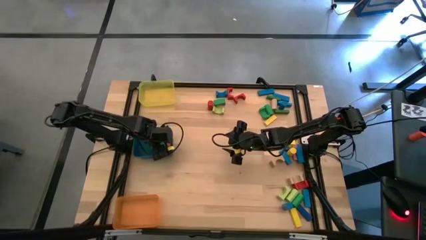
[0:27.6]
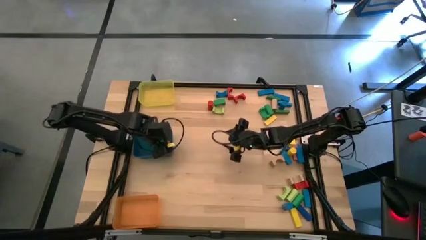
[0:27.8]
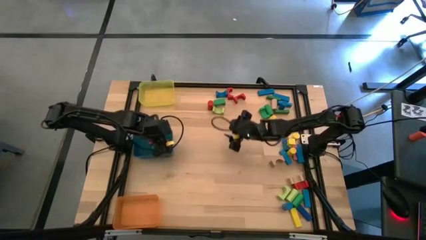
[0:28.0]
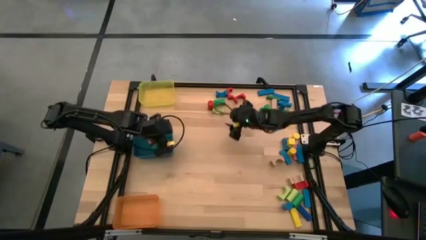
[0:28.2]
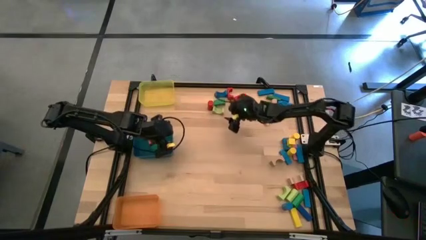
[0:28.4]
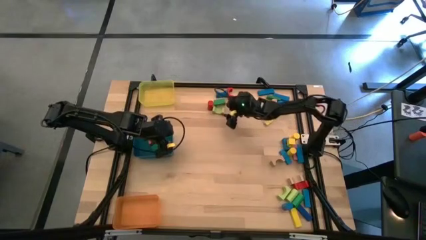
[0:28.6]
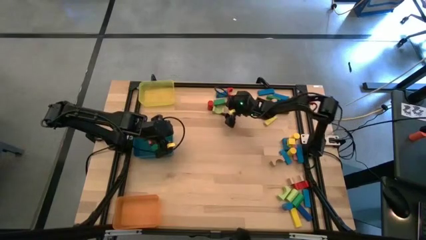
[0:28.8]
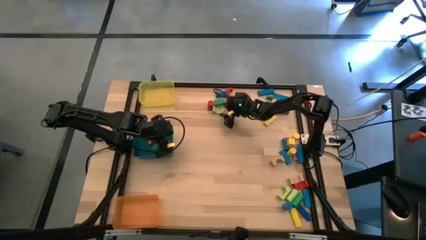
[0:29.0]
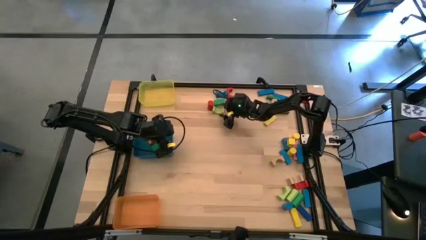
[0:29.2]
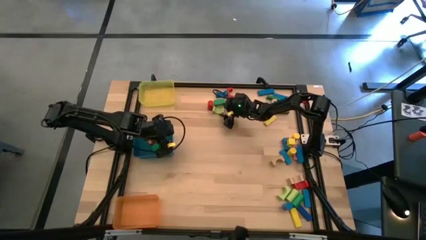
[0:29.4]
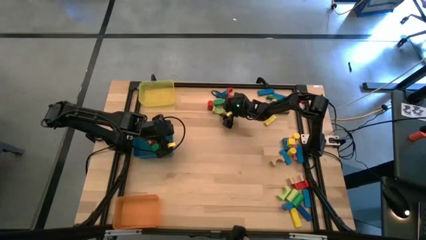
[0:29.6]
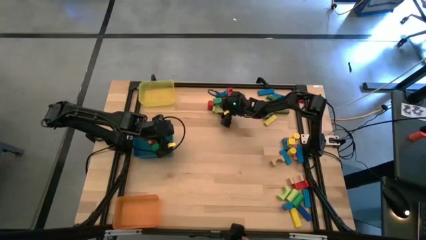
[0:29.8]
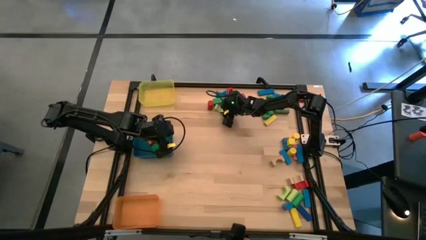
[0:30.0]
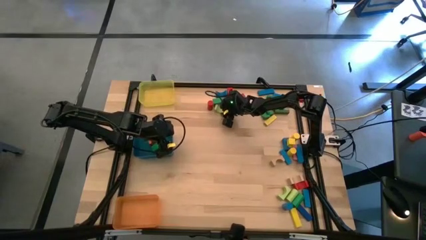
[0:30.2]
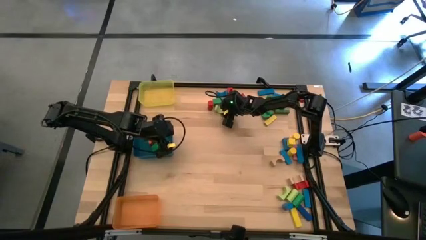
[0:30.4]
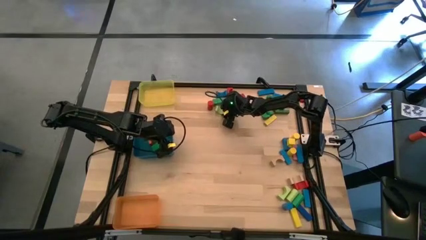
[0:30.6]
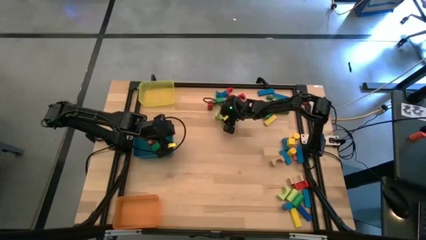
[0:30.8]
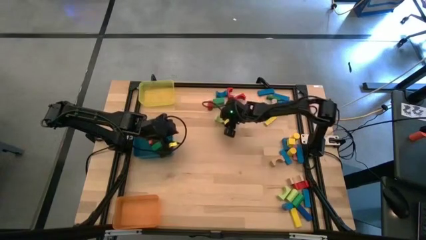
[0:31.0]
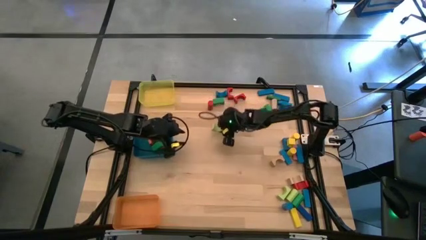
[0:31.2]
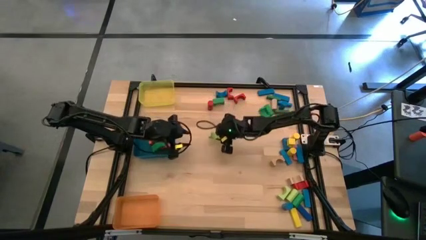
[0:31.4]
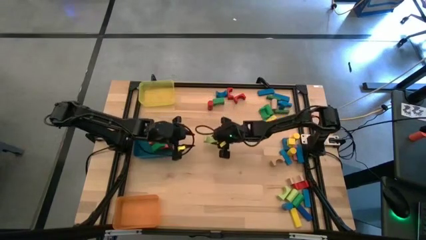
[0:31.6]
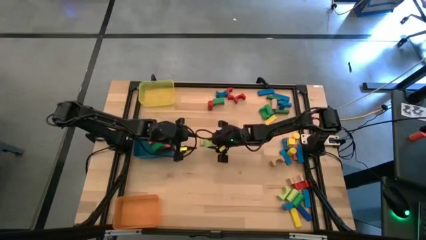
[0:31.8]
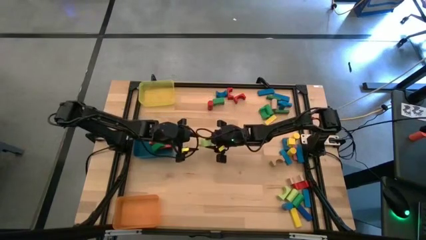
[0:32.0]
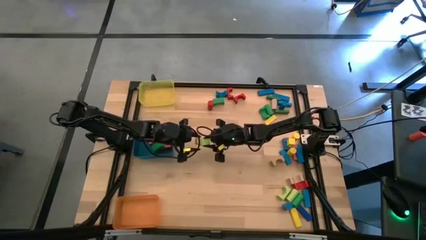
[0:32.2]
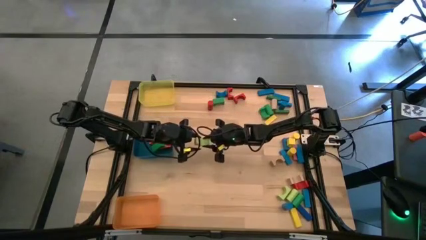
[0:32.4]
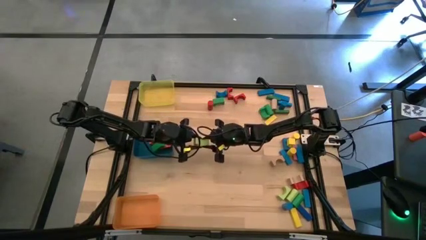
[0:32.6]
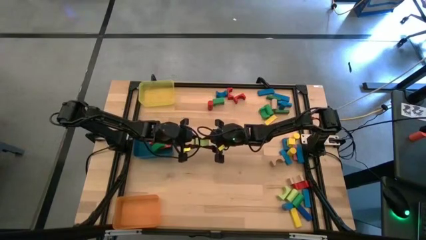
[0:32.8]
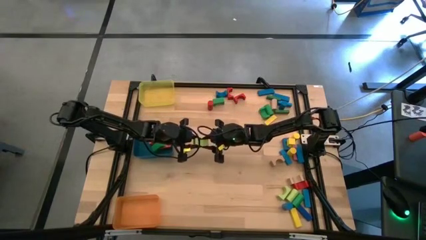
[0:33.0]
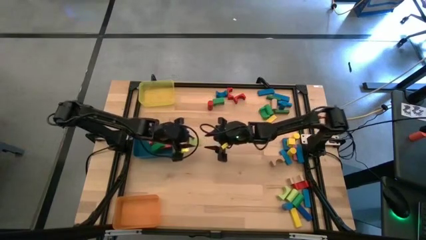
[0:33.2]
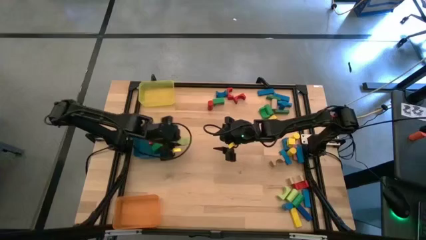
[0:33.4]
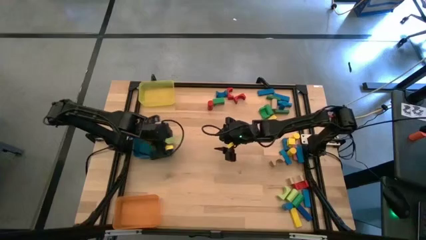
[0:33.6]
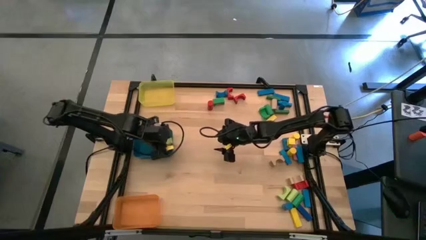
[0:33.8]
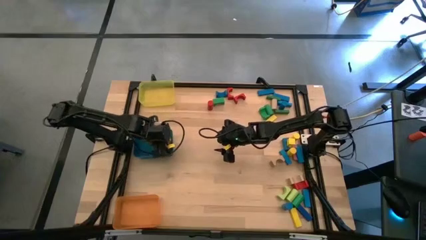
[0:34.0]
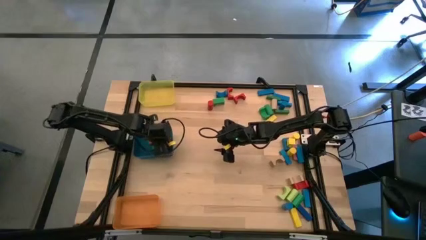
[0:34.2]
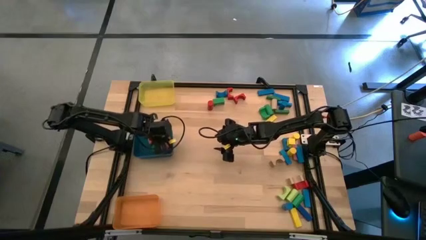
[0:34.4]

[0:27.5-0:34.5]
Task: Sort blocks by size
Put the light green arch block into the blue bin

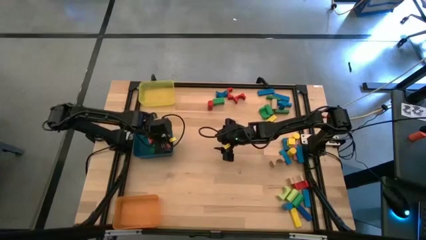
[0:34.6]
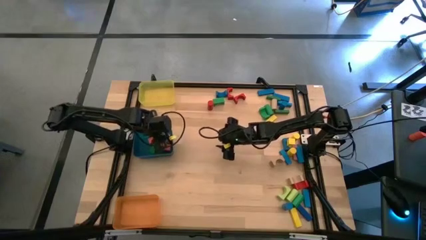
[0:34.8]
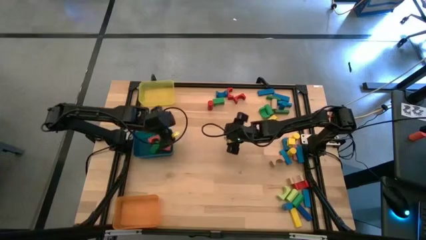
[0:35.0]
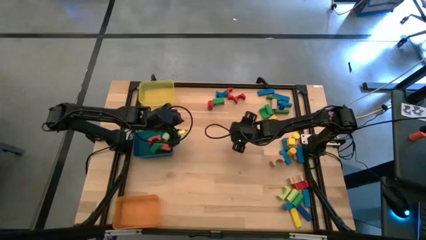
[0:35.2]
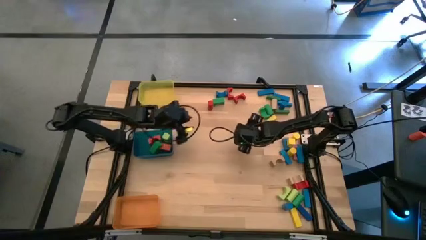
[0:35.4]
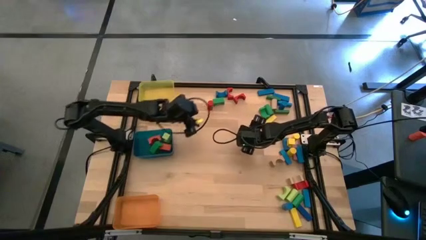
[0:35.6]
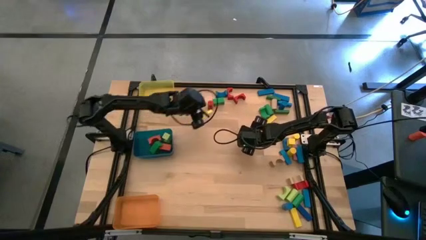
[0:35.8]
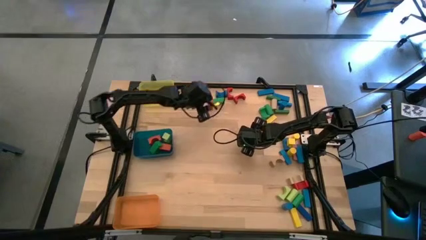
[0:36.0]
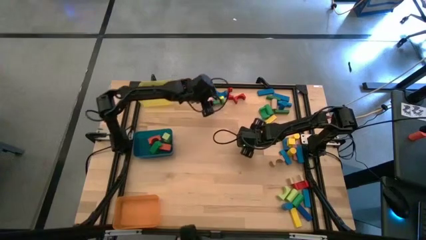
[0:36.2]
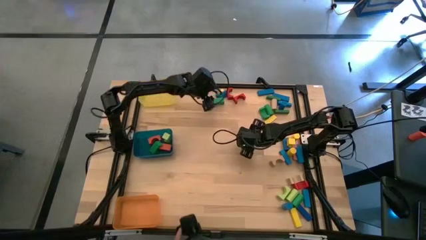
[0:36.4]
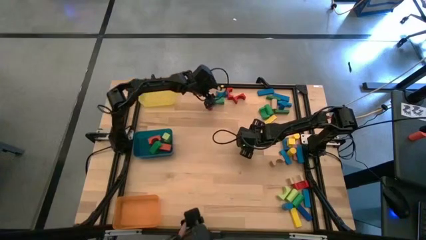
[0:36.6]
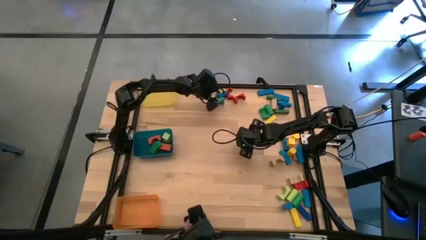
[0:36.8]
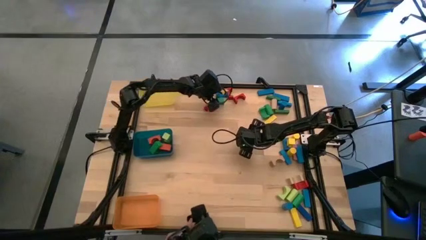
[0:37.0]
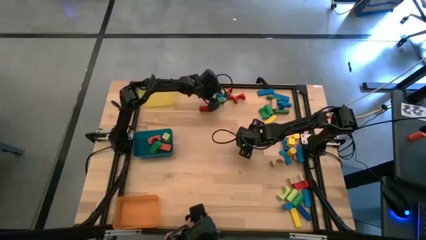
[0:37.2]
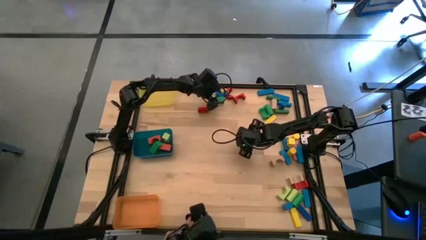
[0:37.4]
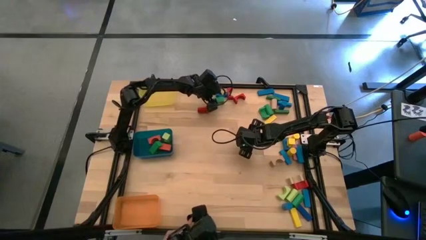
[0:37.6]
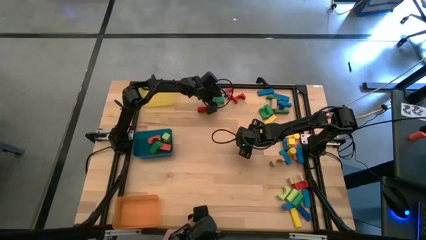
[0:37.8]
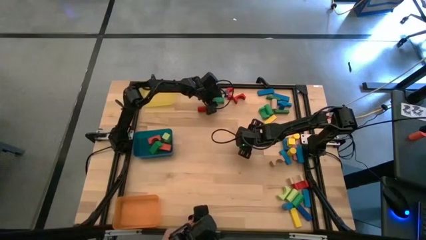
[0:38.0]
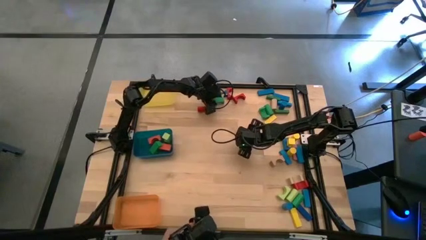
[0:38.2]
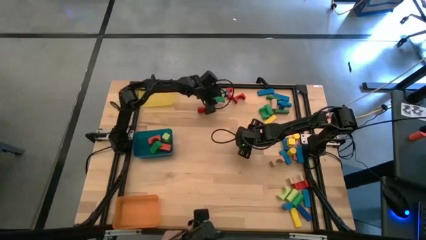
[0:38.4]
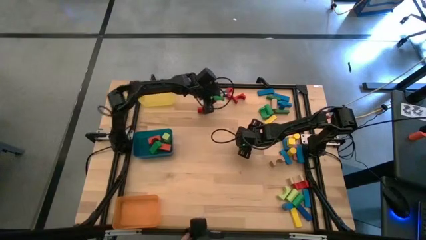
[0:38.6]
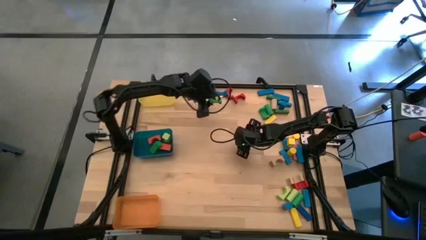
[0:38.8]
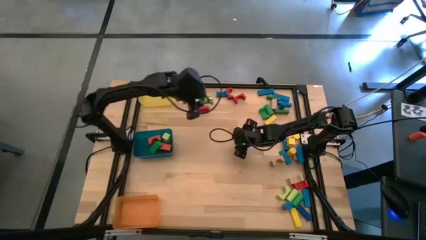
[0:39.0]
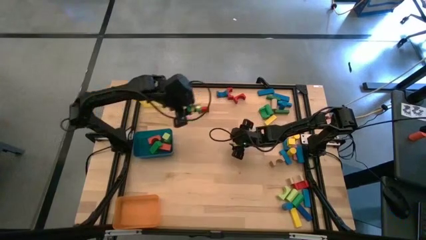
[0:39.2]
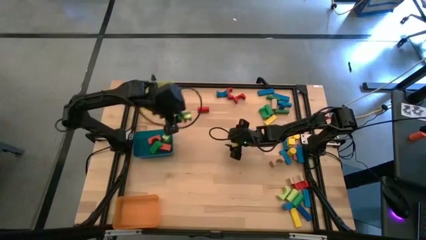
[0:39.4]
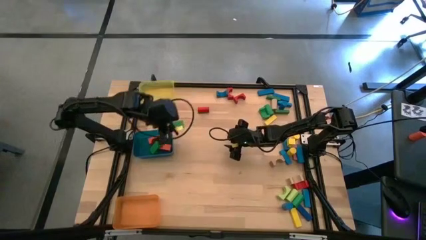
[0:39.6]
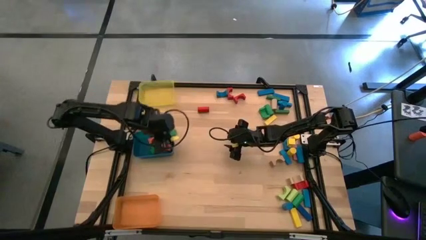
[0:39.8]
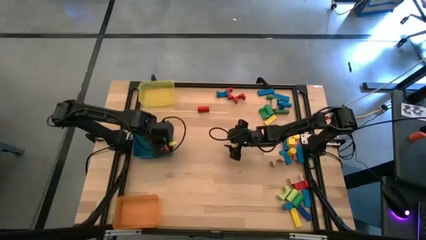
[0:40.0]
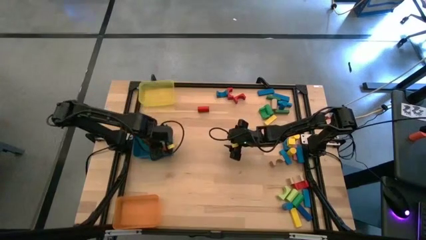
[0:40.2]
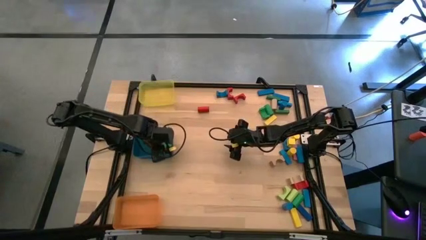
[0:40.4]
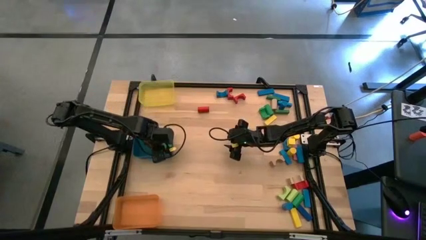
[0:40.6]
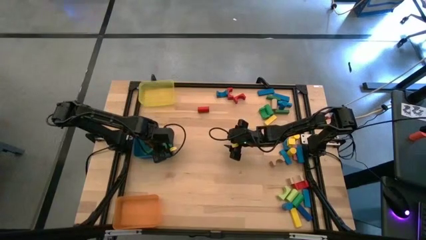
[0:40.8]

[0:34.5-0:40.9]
Put the green arch block into the blue bin

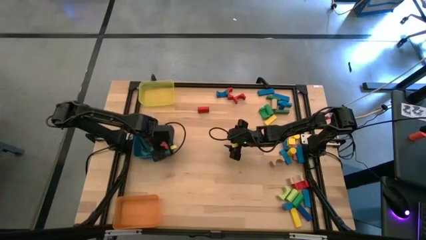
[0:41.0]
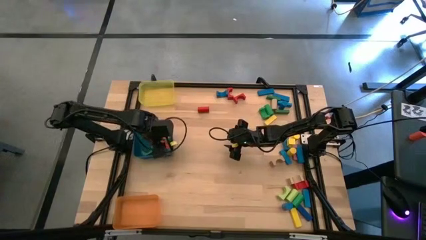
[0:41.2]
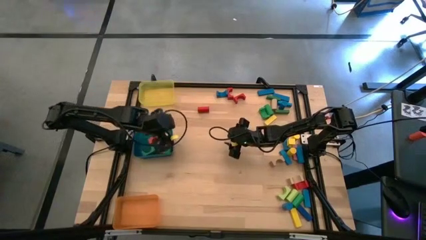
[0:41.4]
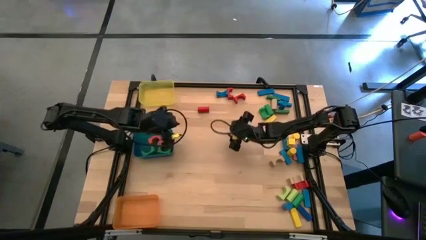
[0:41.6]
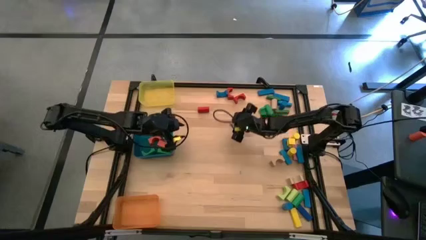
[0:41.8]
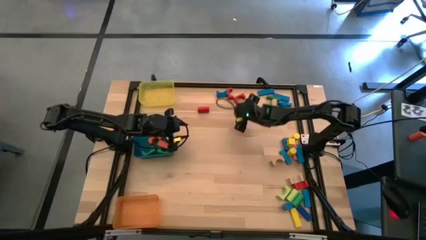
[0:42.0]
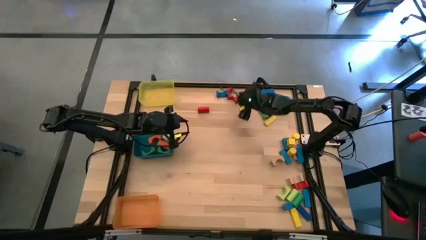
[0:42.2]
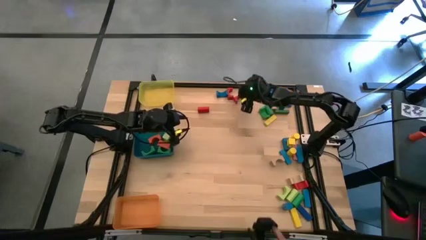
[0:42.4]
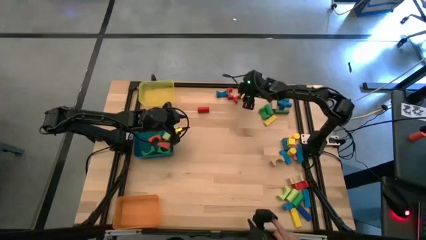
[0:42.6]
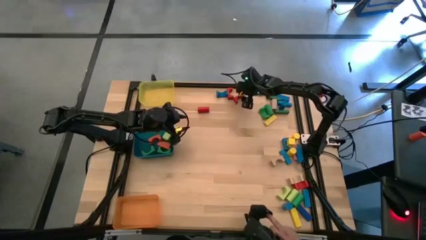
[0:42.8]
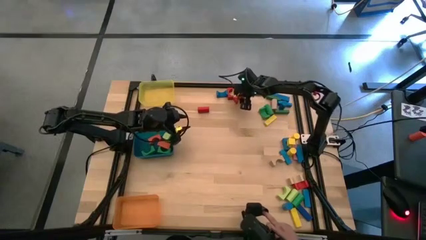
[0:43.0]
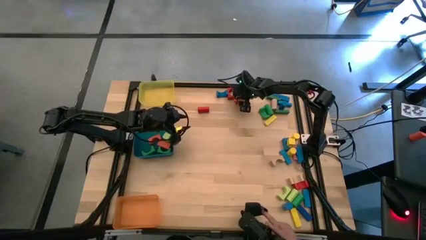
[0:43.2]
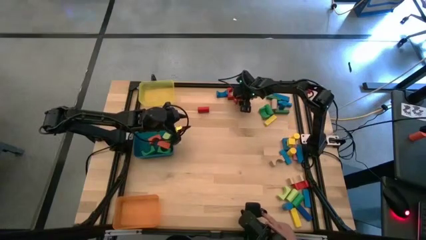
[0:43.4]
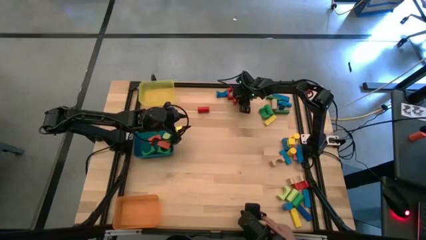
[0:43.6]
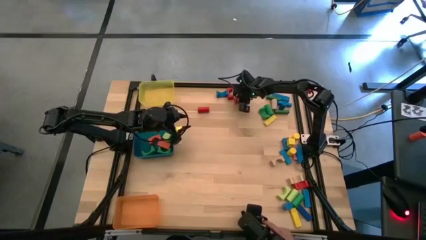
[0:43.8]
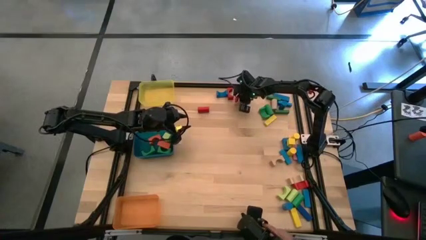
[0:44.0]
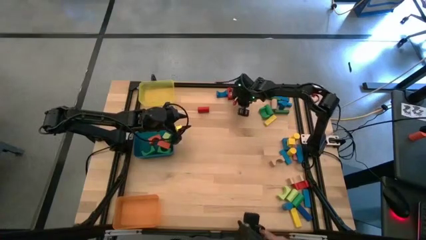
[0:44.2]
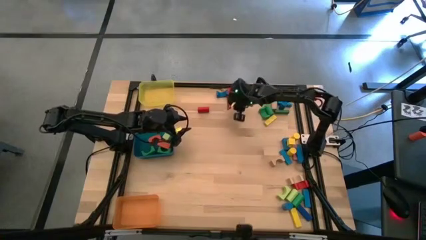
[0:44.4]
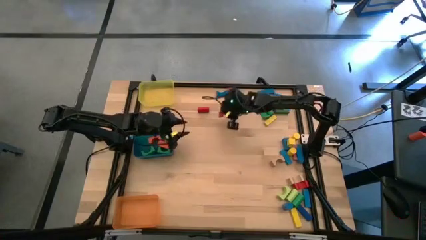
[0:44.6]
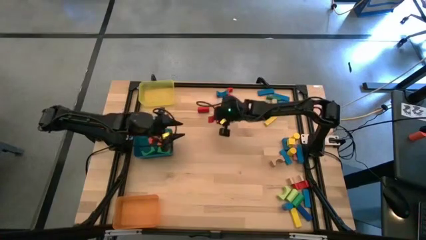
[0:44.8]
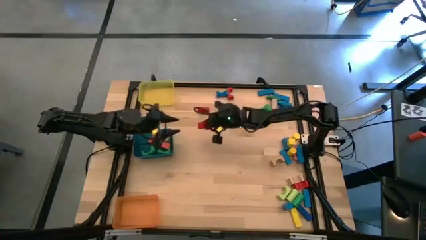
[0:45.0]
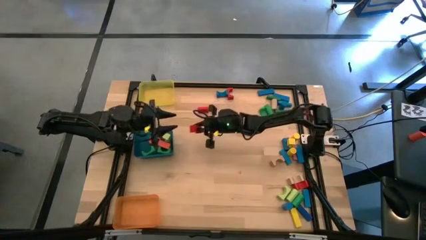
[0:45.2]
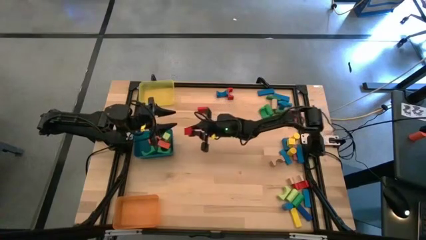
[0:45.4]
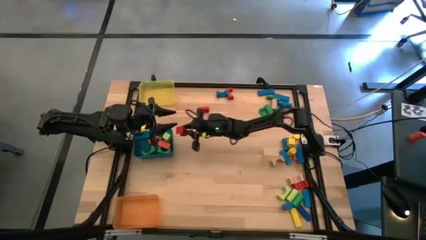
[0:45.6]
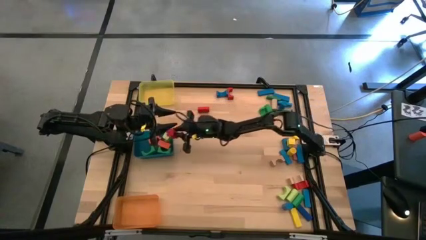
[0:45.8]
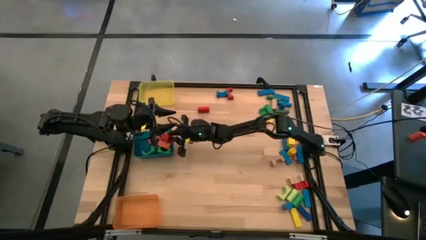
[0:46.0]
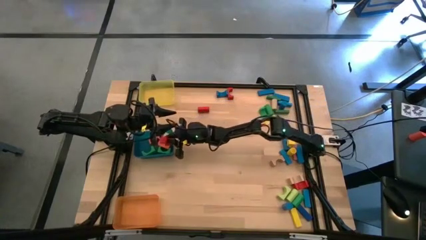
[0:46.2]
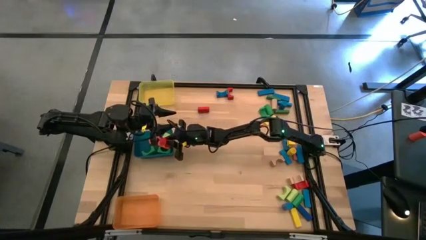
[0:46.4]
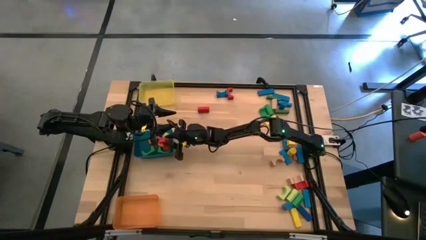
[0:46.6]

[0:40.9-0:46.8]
Put the red arch block into the blue bin
